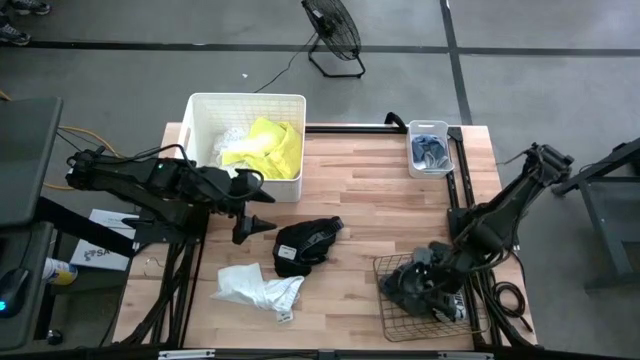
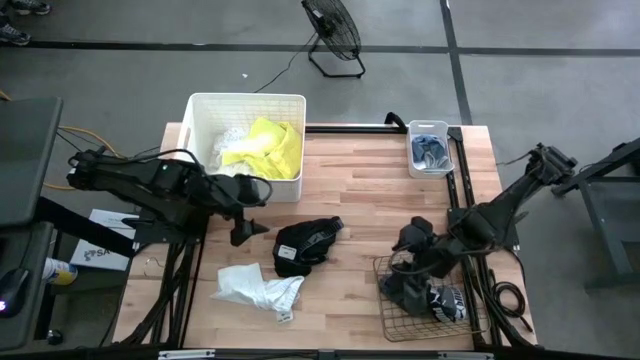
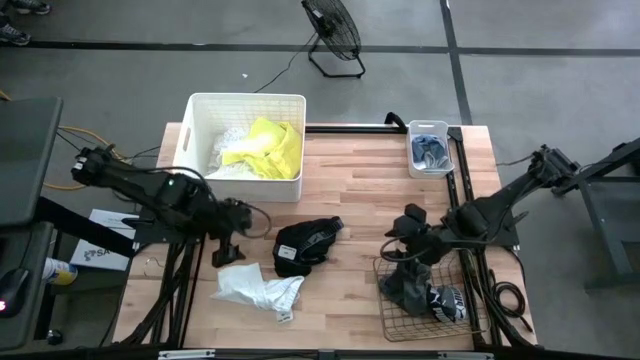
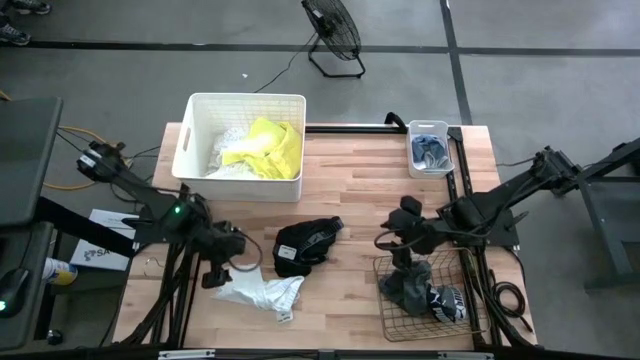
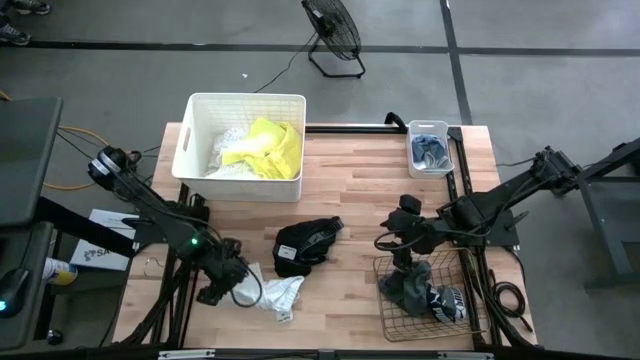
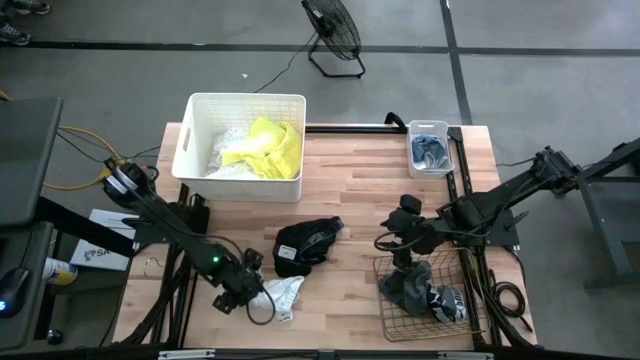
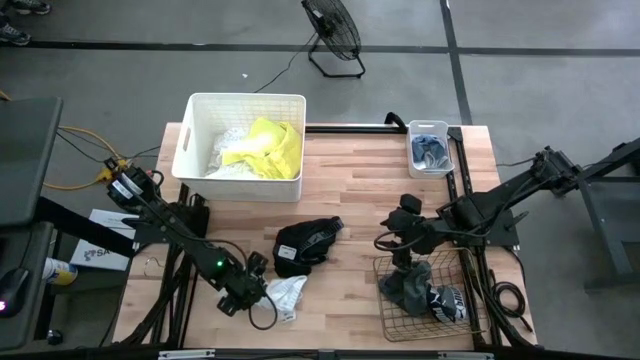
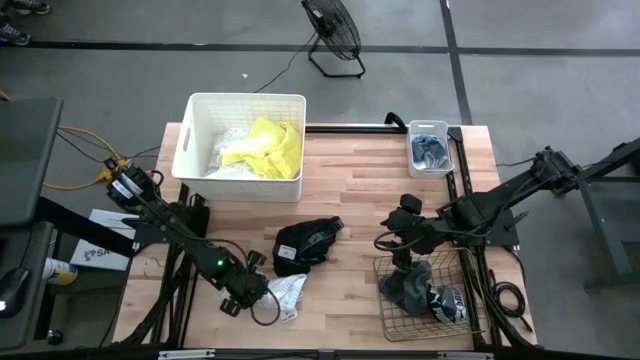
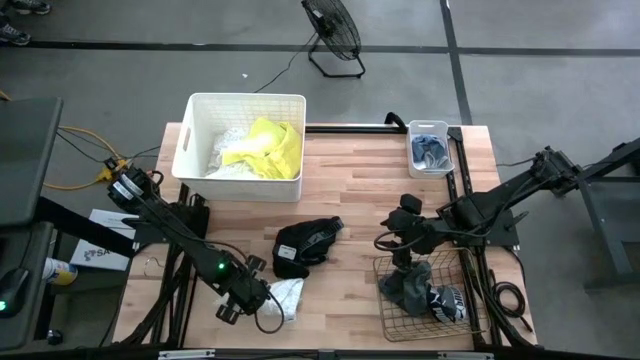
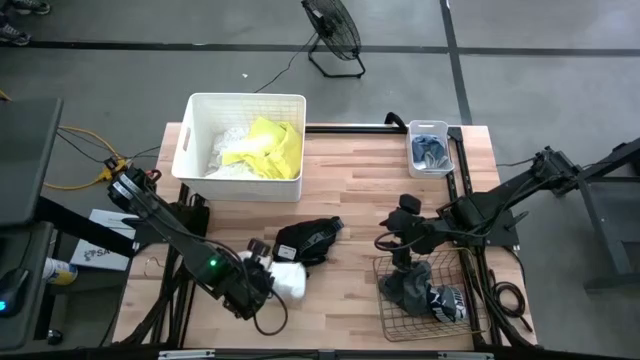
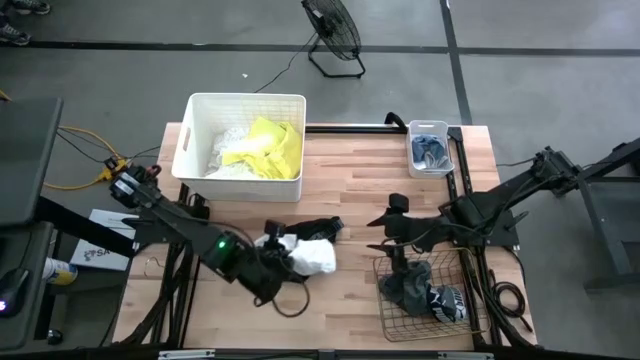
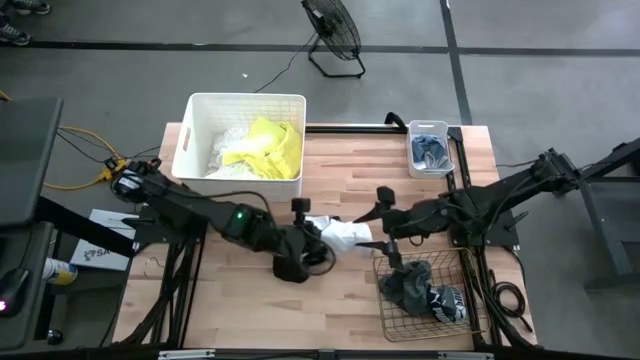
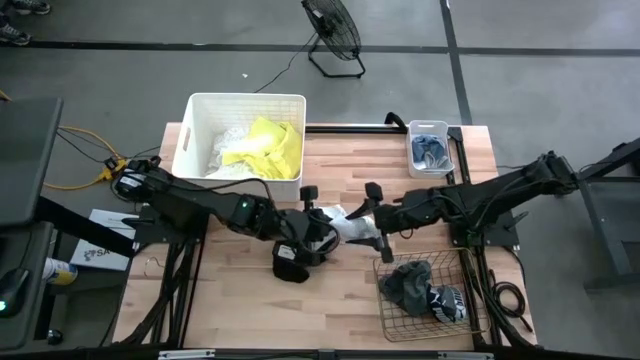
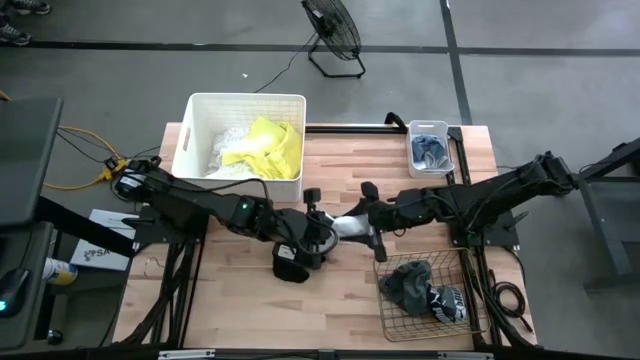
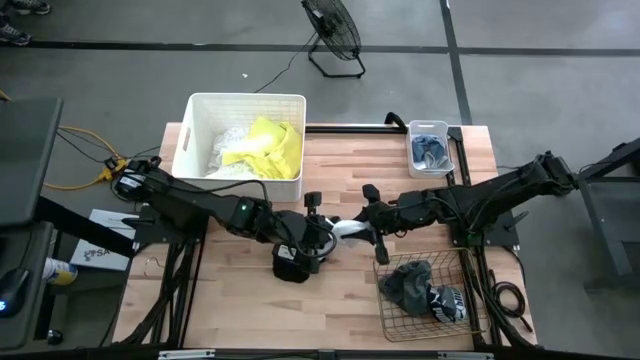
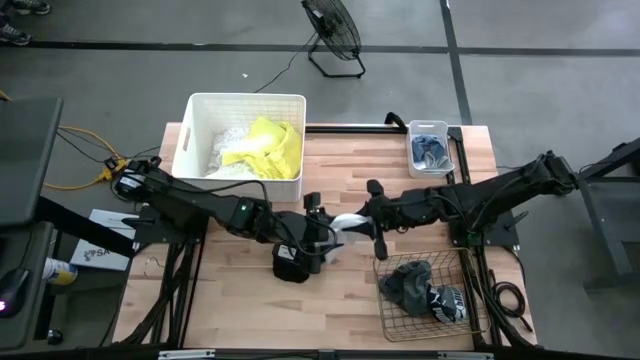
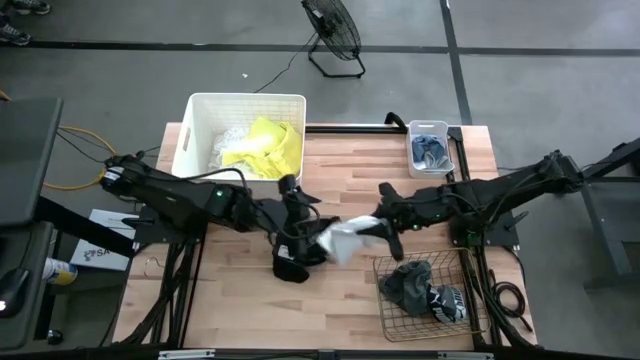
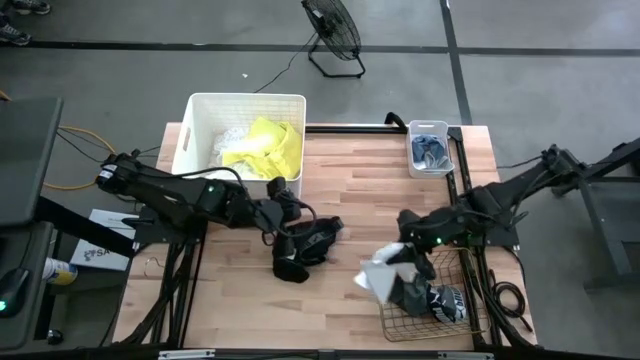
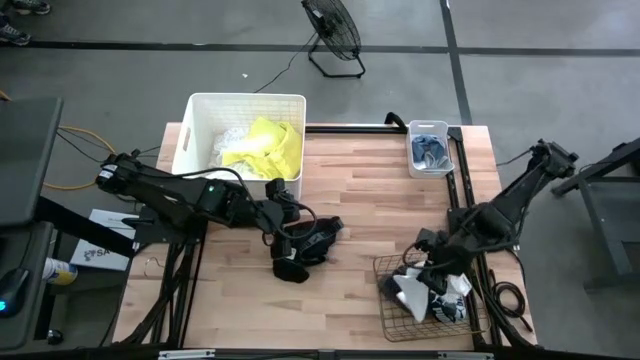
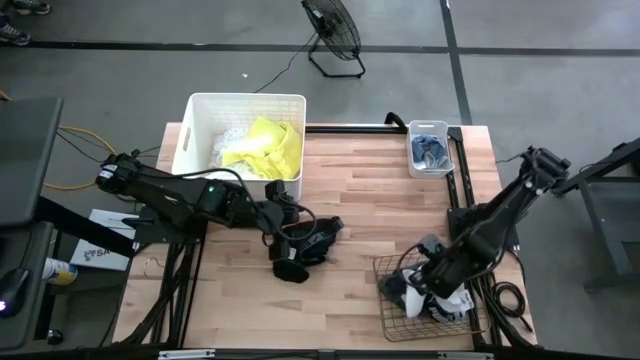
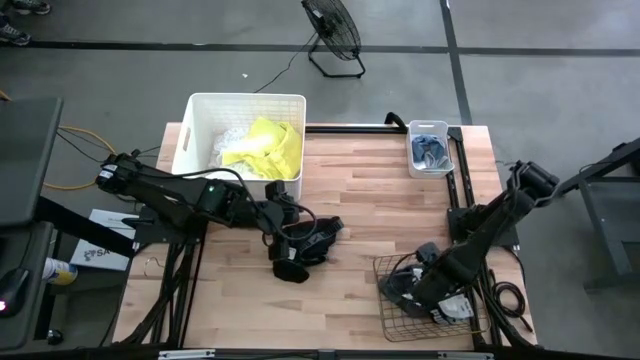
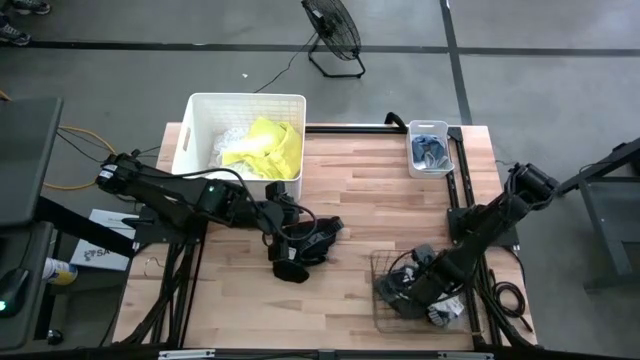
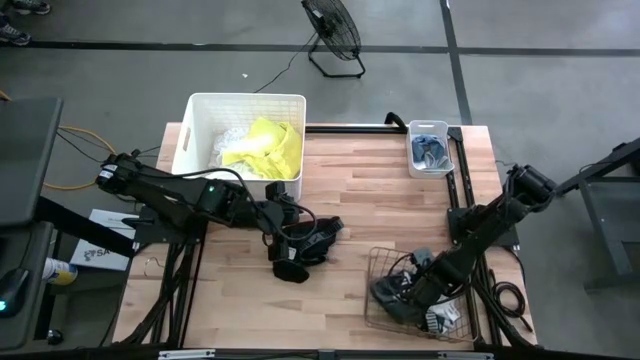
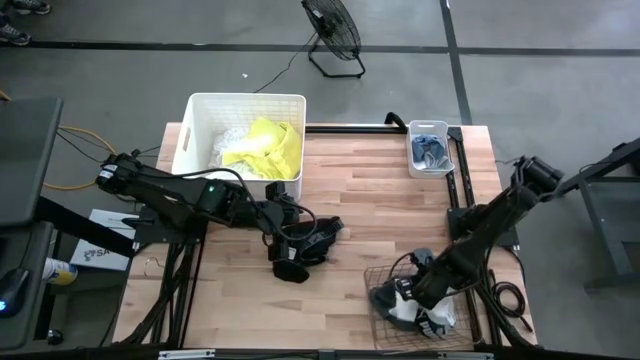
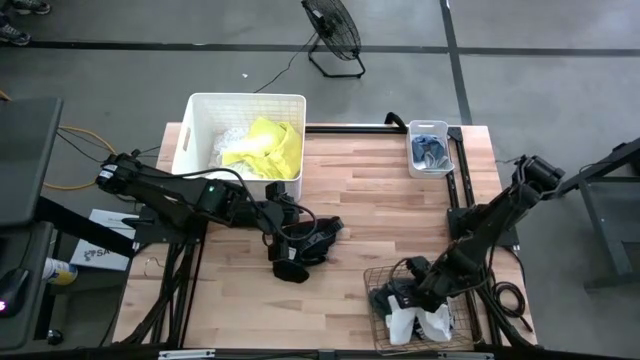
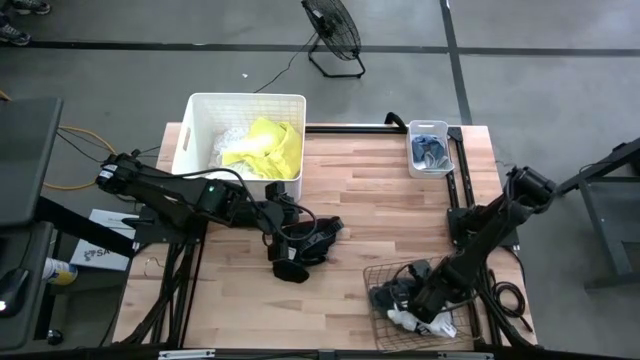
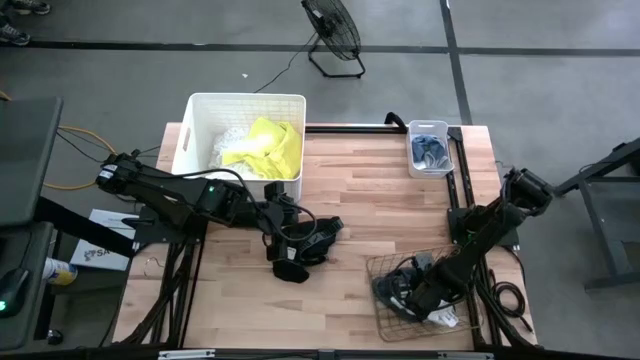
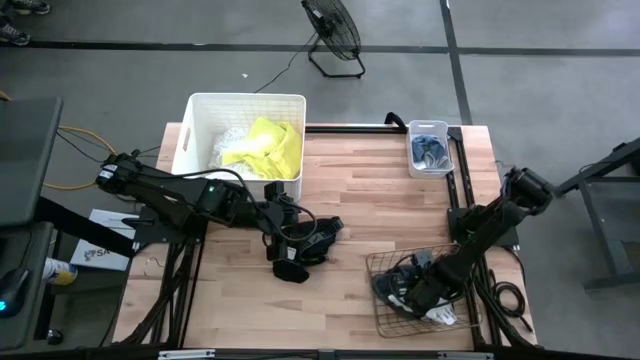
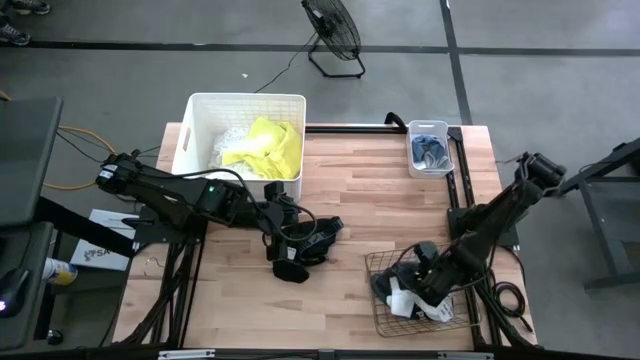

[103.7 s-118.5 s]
Task: Pick & Place Cloths
Put the white underwear into the wire basket

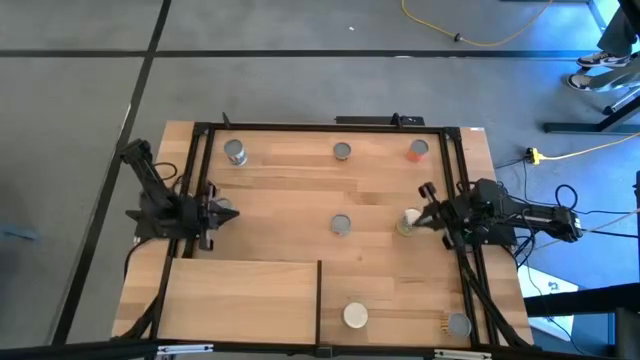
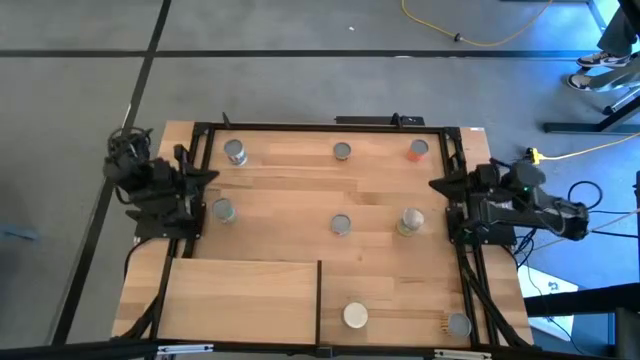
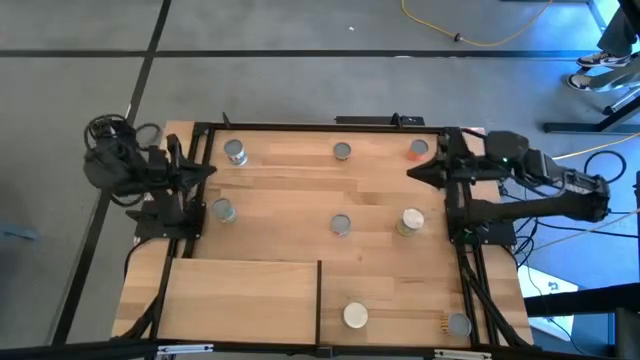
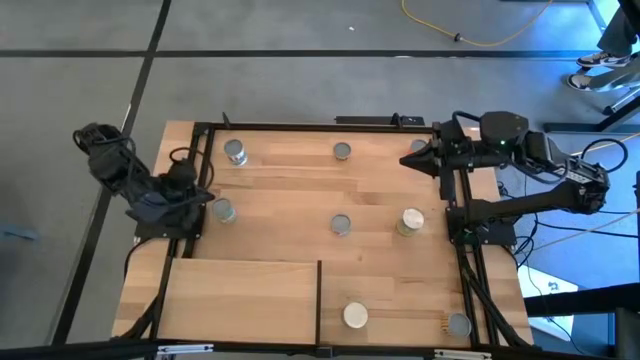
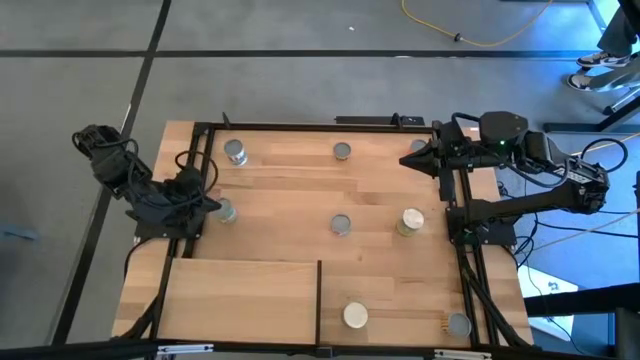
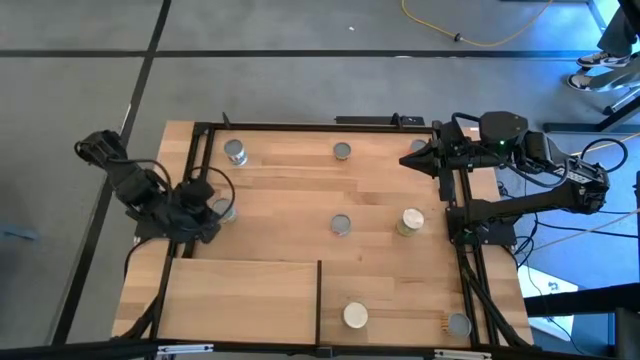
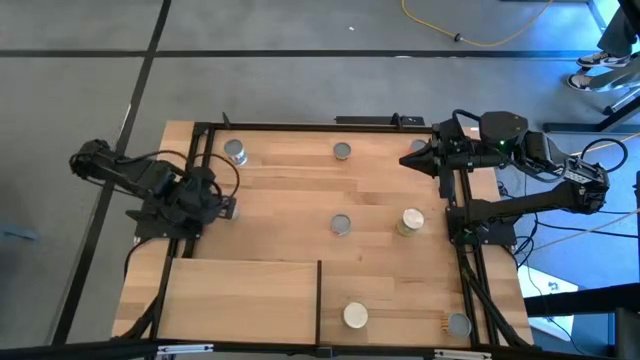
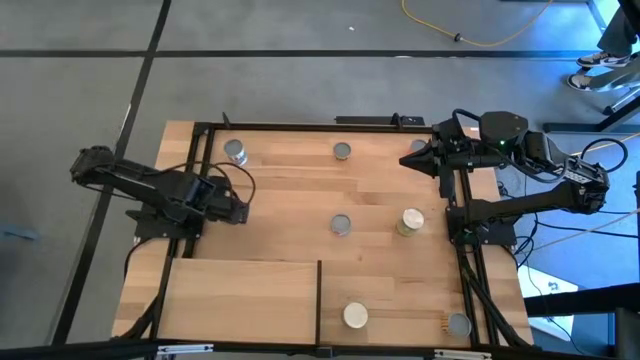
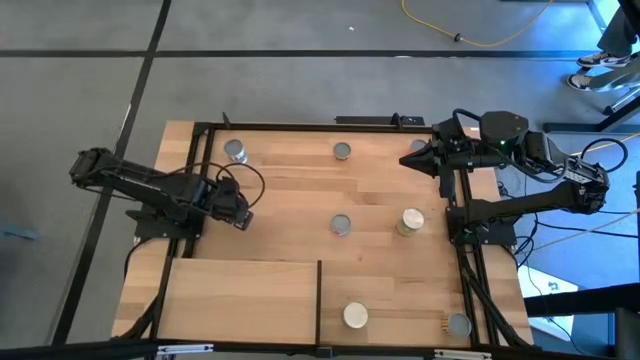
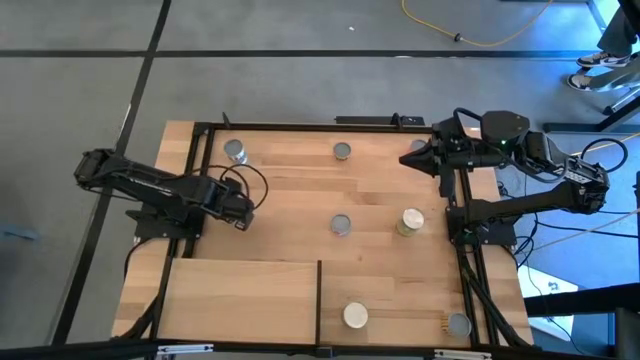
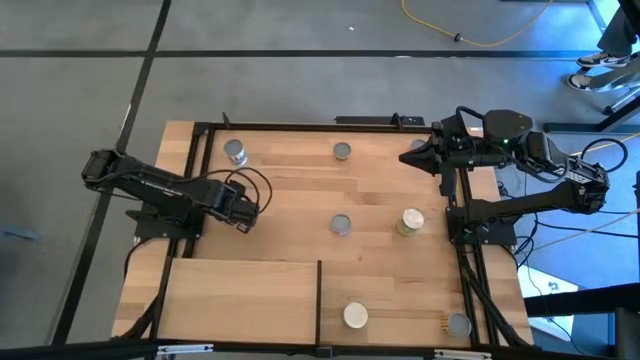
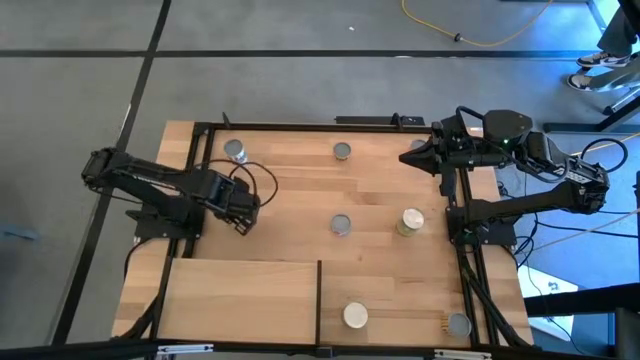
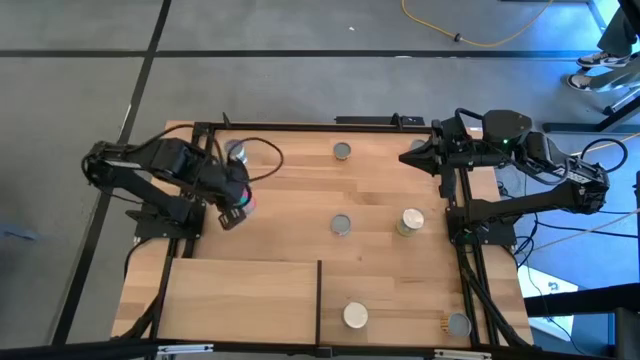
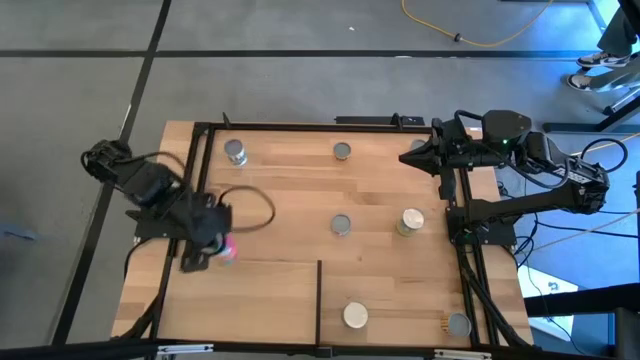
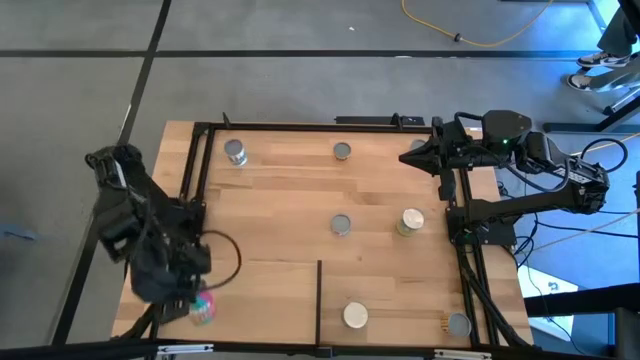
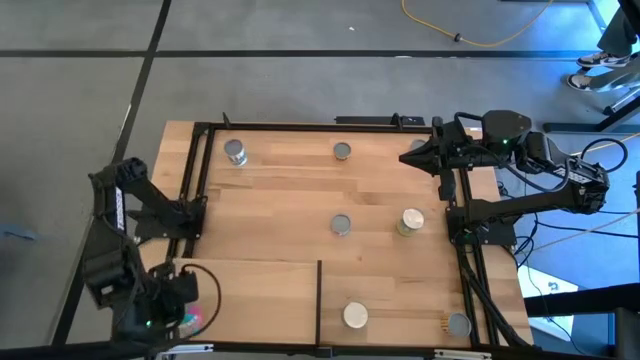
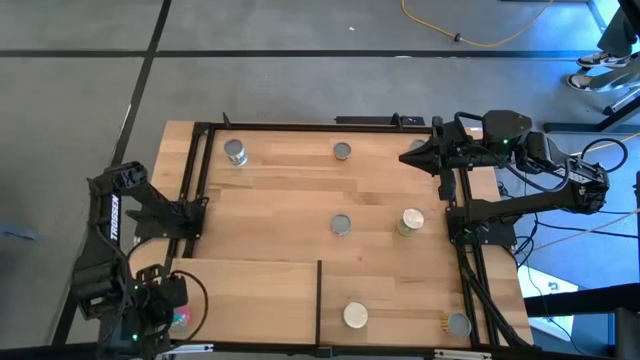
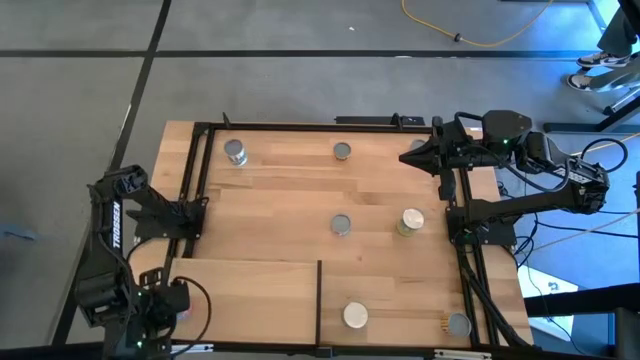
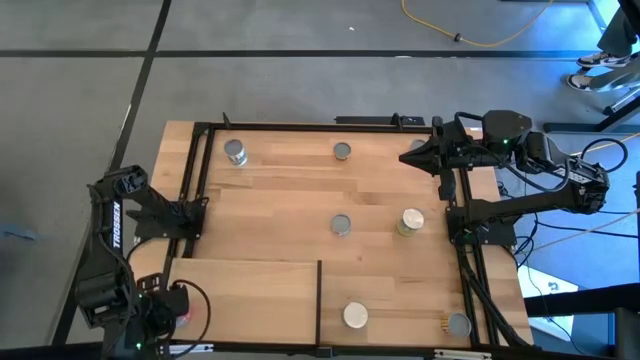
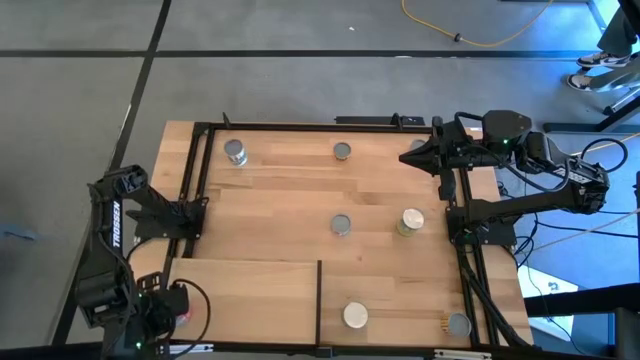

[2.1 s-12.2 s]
Task: Pick and place cans onto a shelf
Put the canned chicken soup on the shelf
